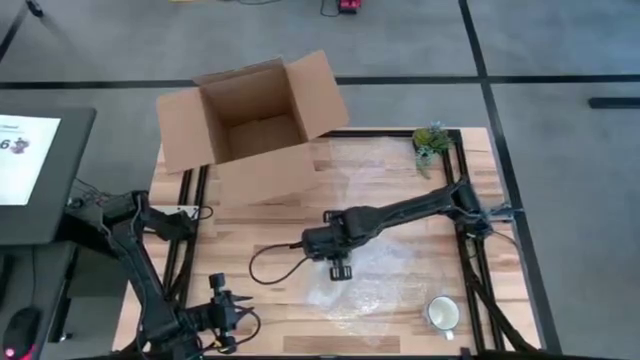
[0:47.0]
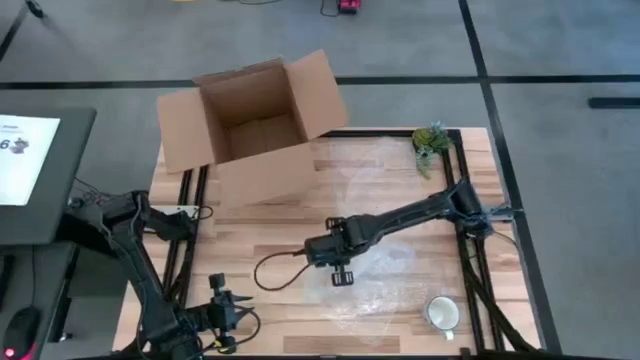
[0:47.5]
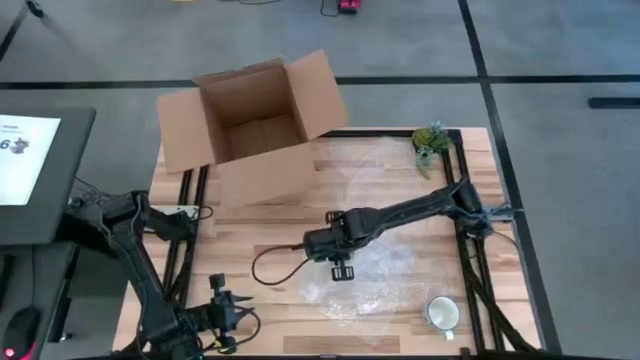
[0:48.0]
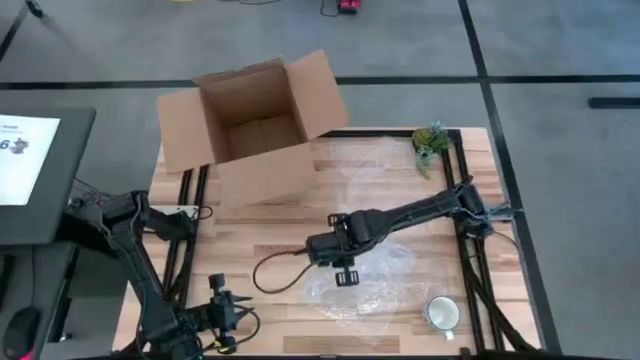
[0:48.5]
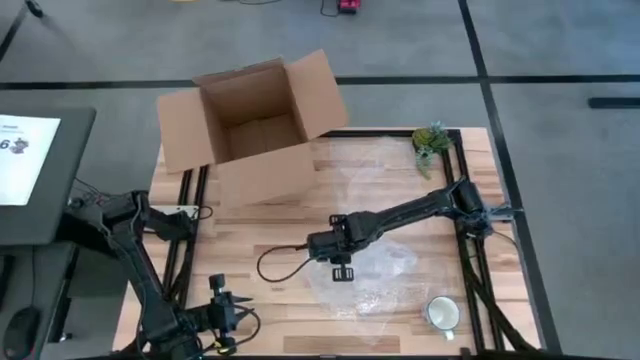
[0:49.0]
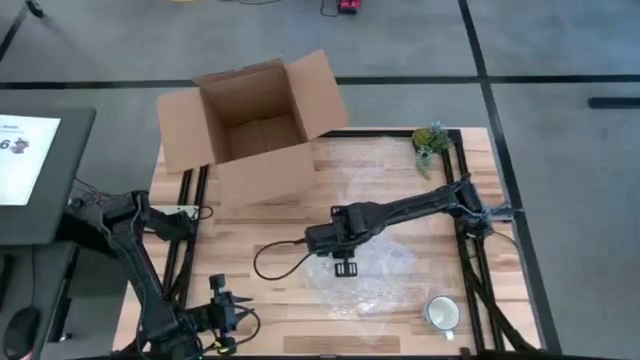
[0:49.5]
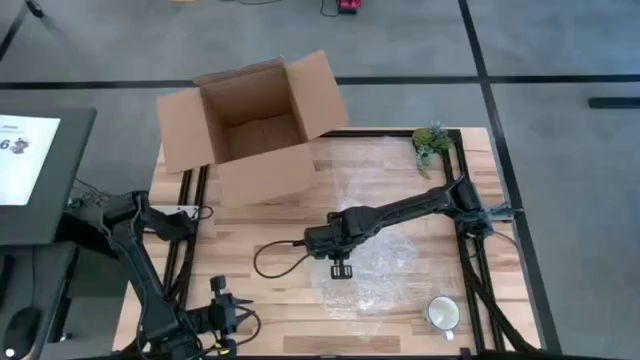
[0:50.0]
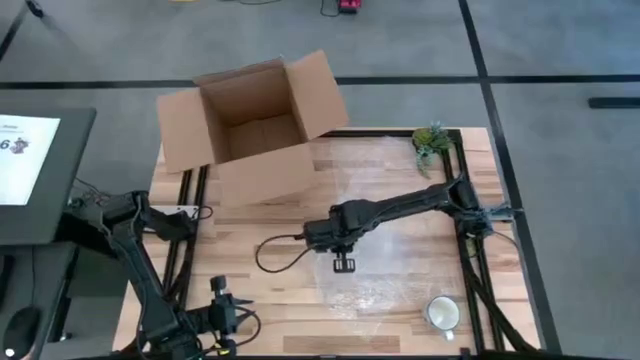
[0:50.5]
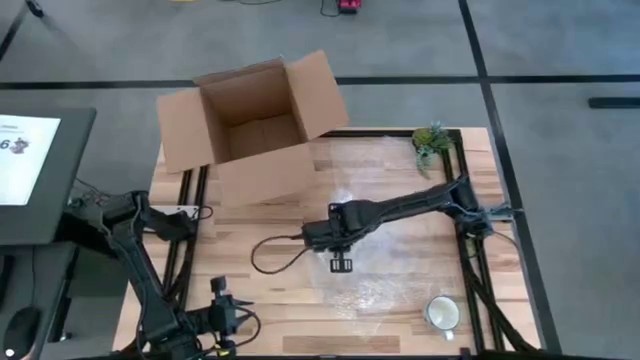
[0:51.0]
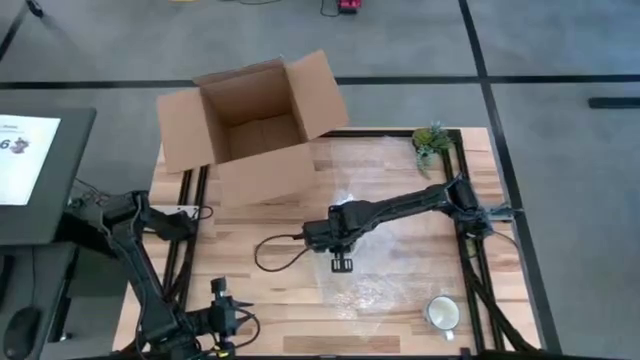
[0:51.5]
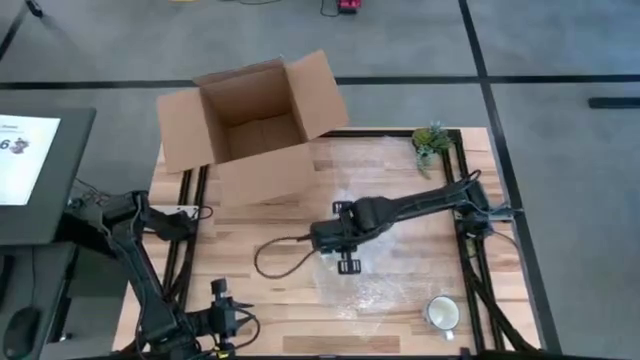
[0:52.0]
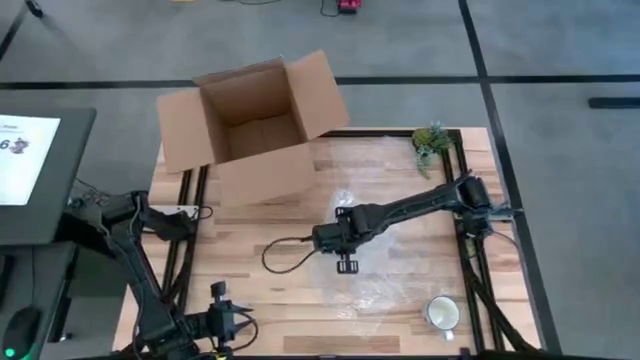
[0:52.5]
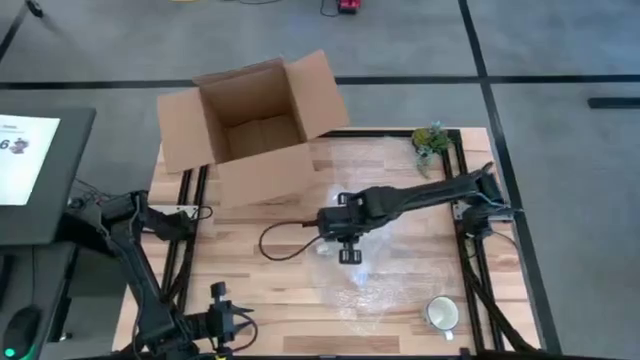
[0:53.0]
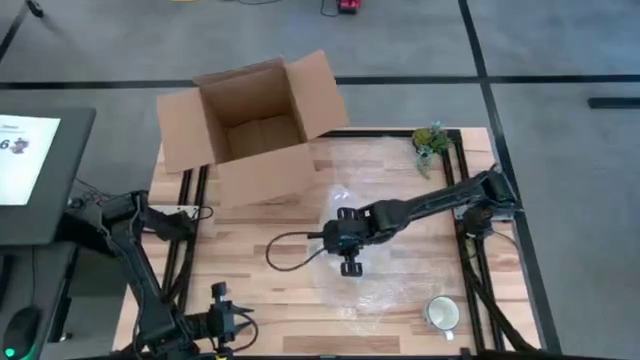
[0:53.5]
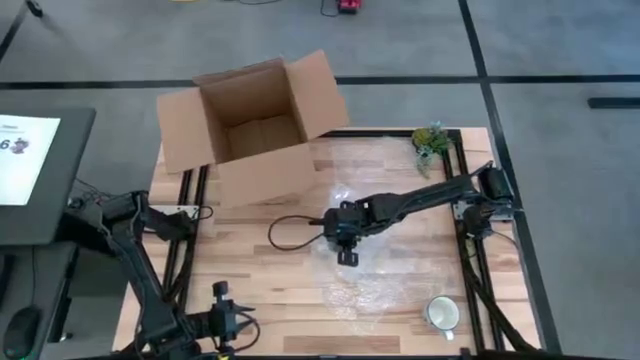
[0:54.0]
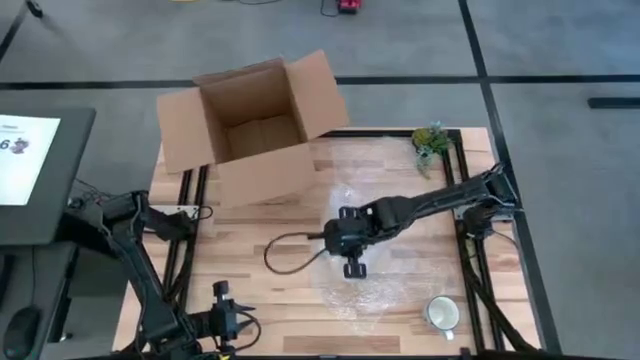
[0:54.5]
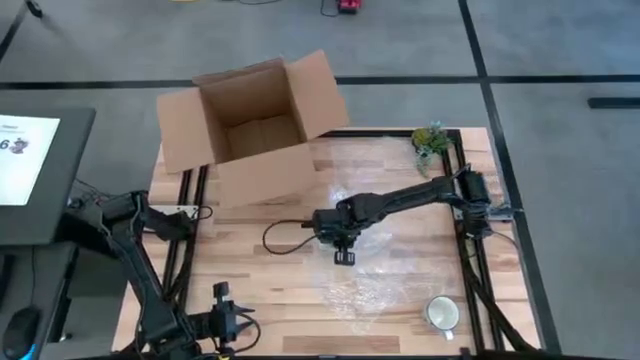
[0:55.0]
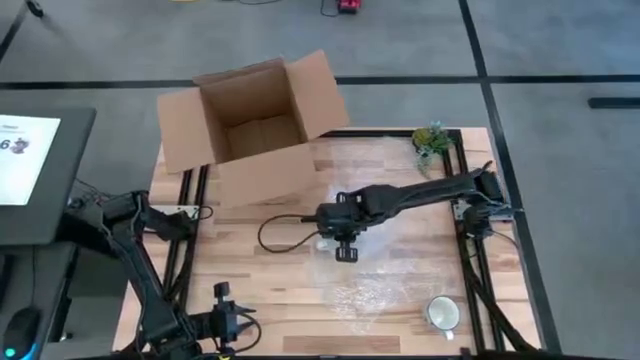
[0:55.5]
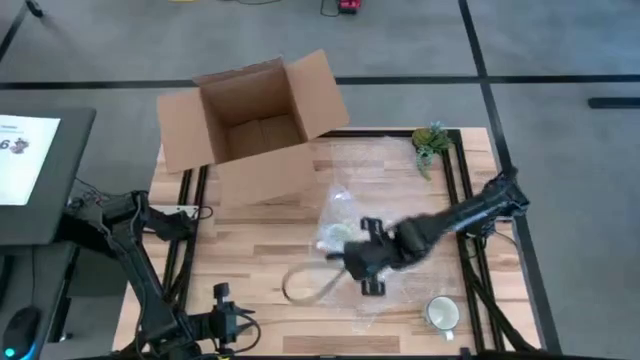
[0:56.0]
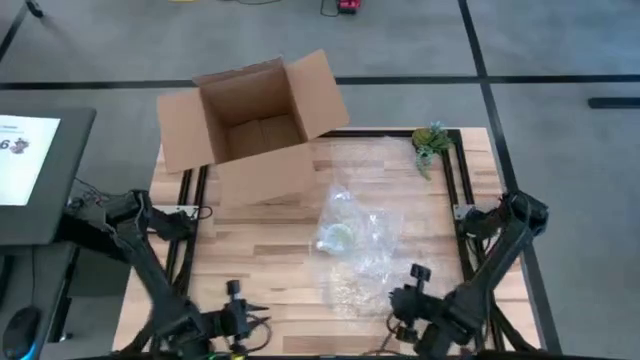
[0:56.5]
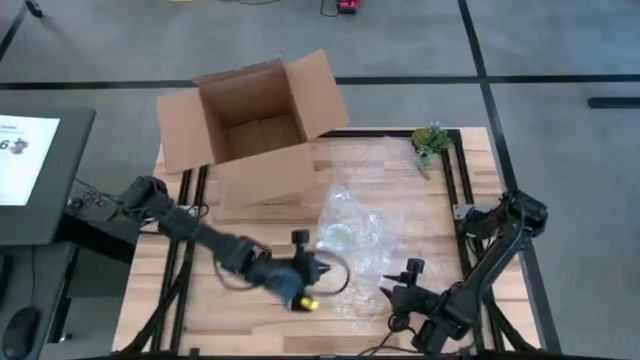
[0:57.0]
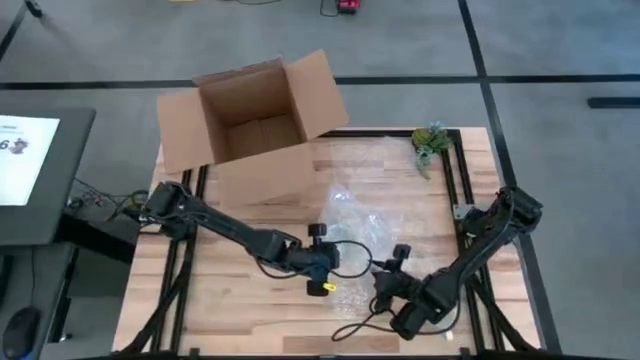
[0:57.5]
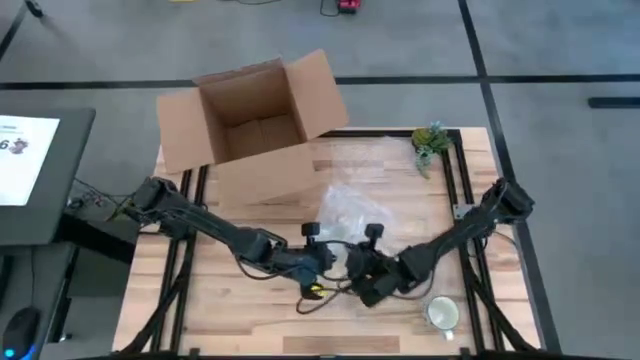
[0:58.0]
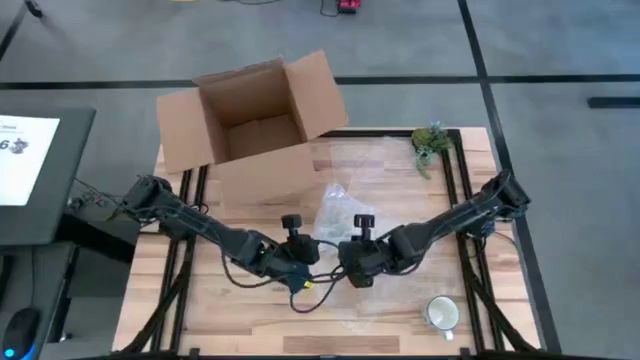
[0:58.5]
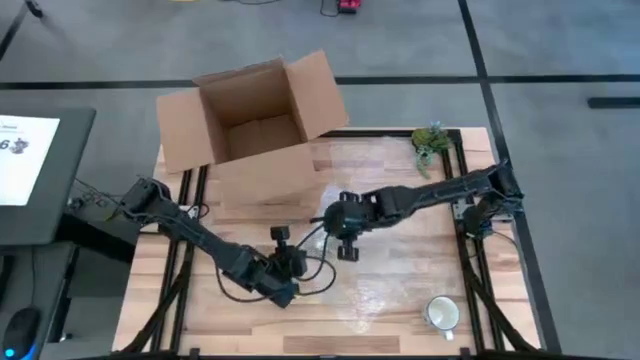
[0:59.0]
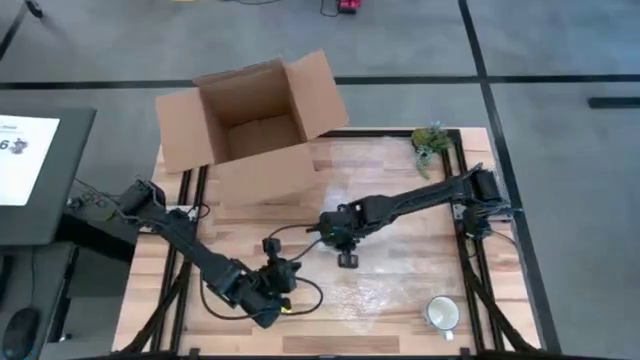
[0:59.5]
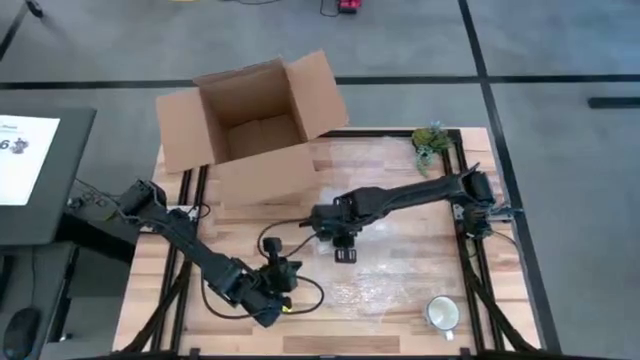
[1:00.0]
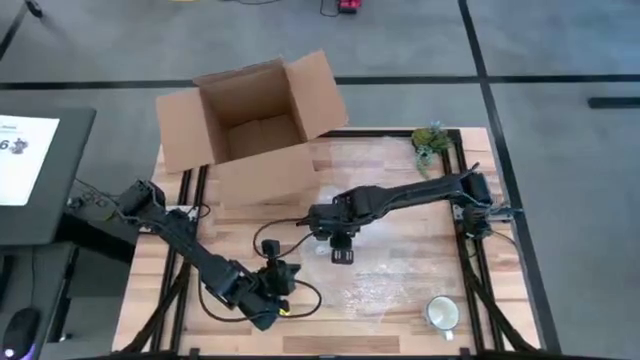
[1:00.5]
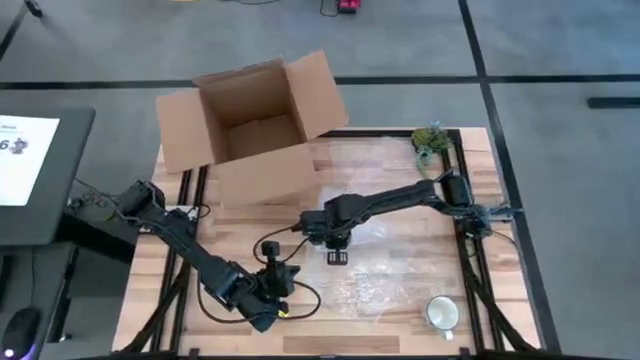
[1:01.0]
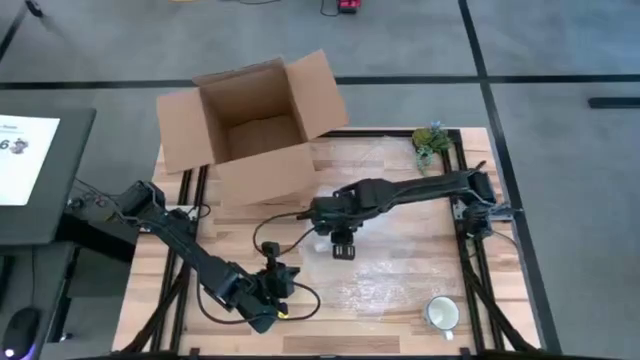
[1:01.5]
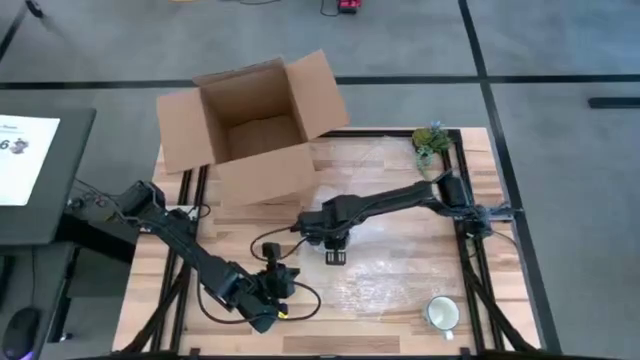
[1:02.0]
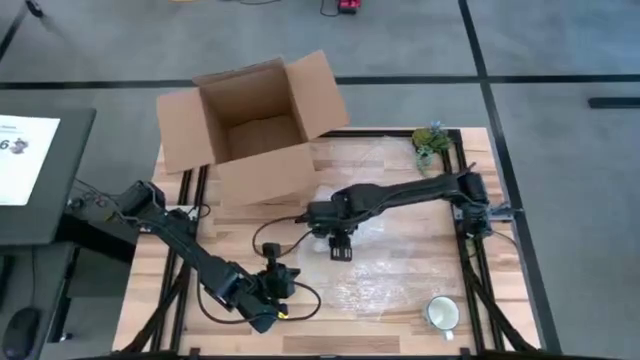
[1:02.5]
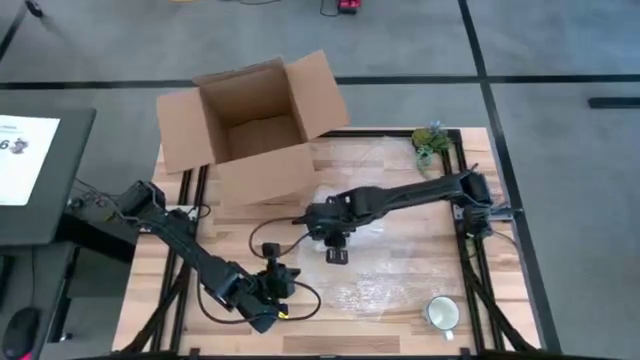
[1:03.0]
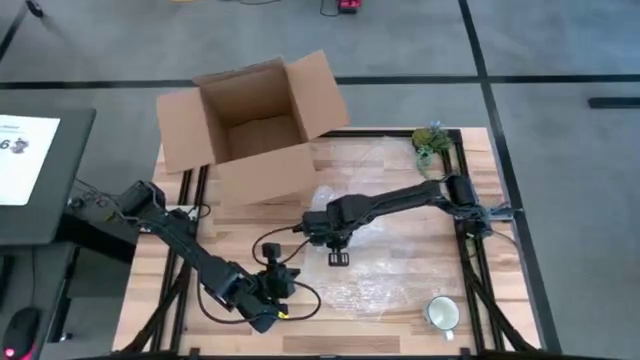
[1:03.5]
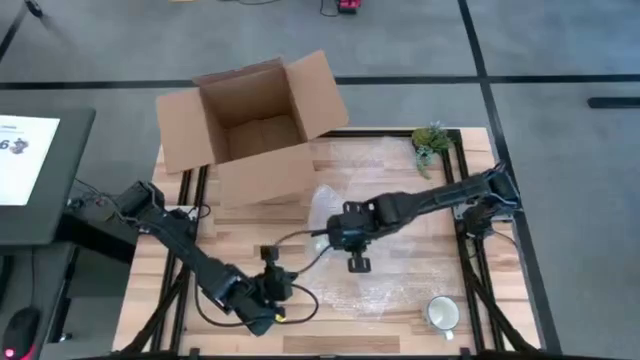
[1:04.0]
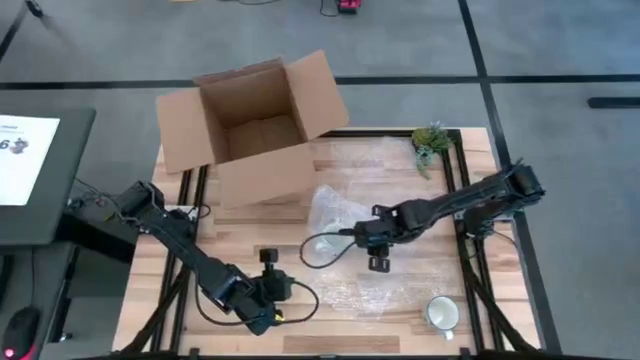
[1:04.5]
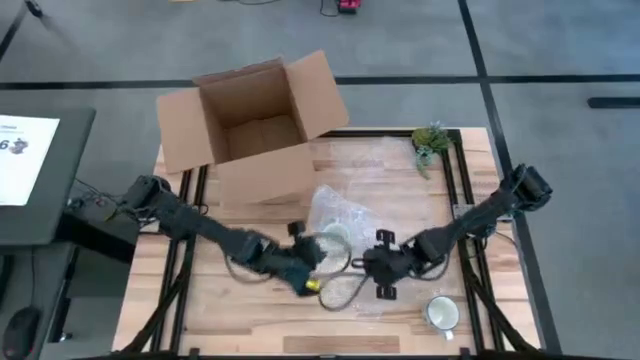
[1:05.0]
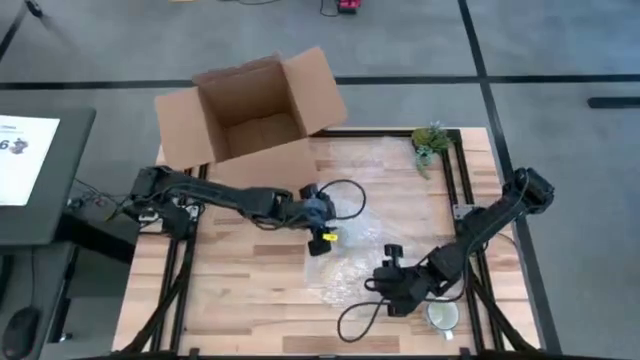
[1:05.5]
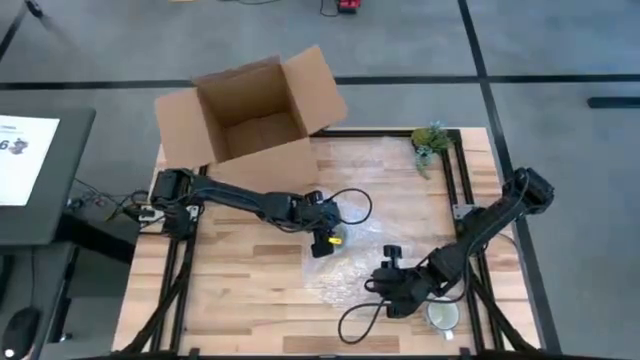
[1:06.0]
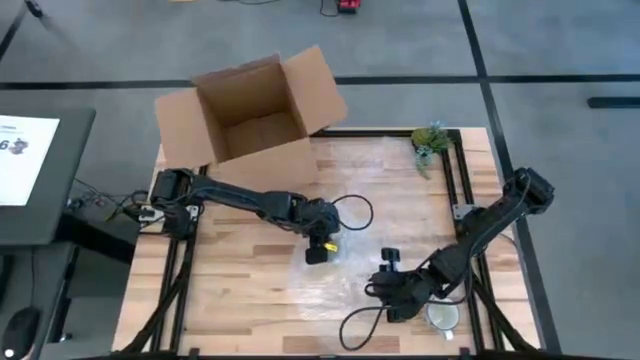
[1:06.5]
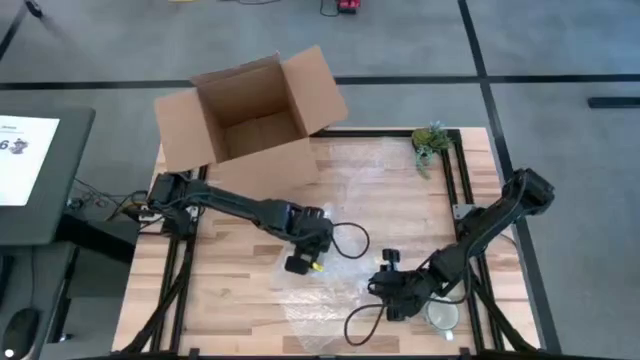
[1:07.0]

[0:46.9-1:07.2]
Task: wrap mug
Wrap the green patterned mug with the bubble wrap

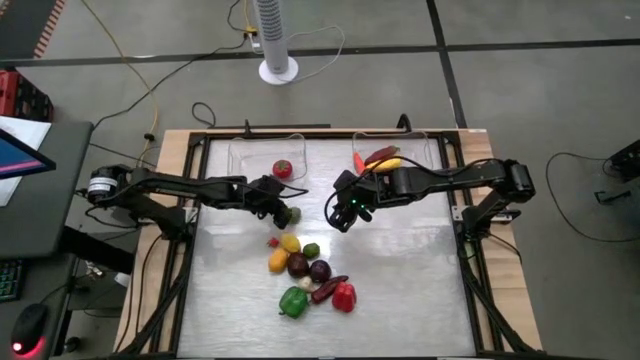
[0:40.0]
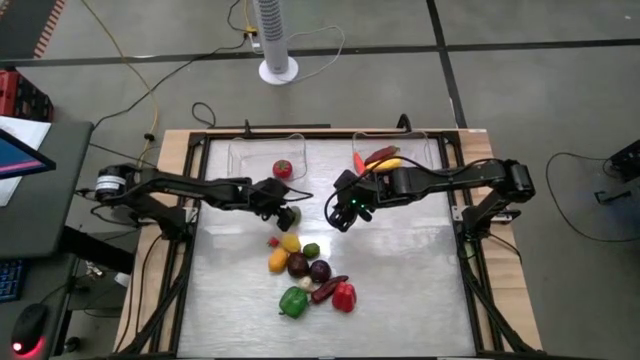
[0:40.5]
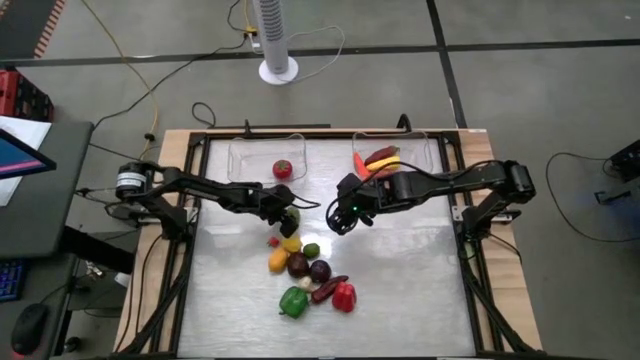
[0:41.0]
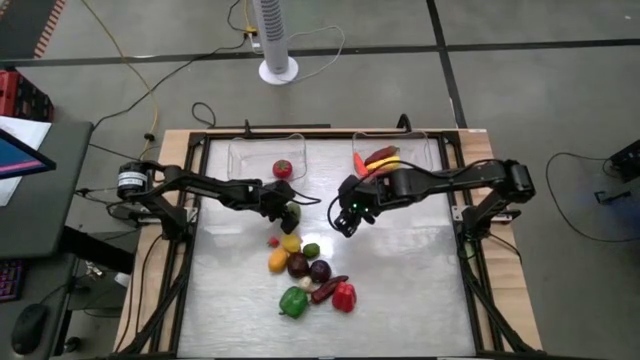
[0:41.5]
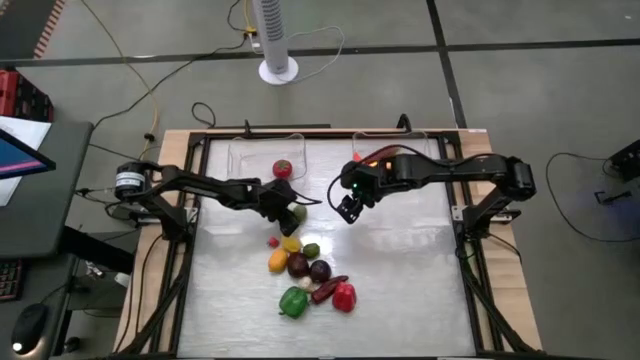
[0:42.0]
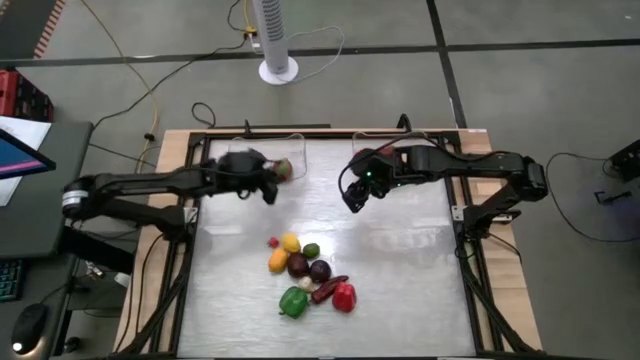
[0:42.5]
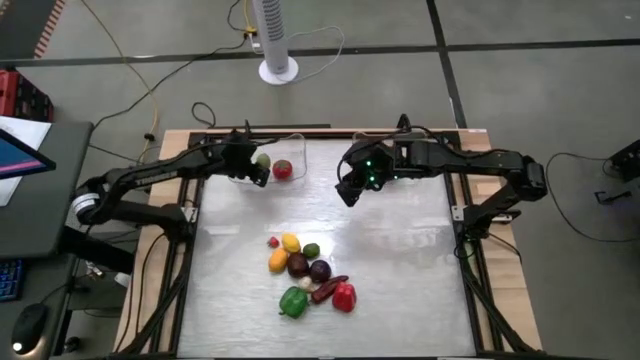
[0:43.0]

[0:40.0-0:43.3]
Task: Sort produce into baskets
Put the green lemon into the left transparent bin
